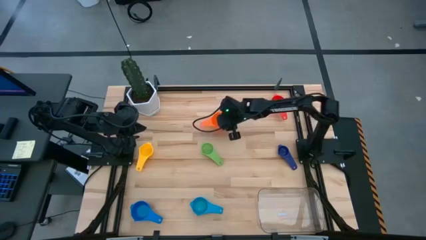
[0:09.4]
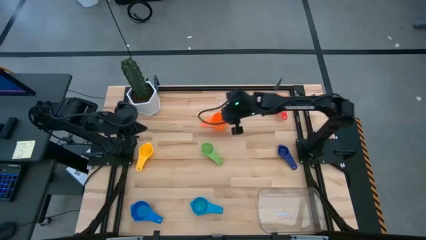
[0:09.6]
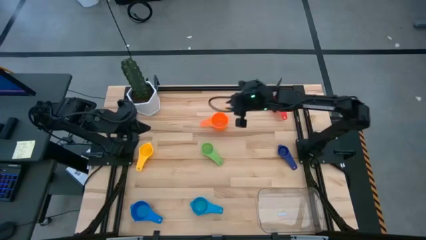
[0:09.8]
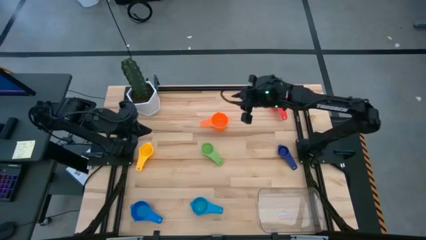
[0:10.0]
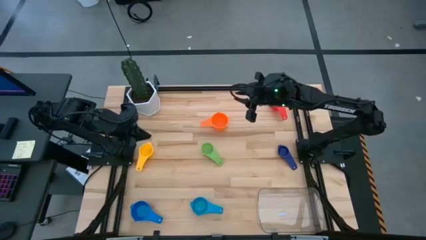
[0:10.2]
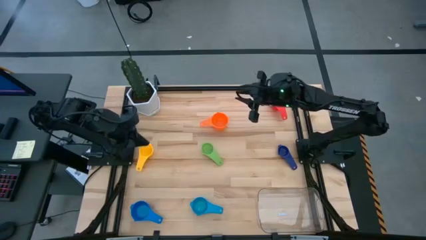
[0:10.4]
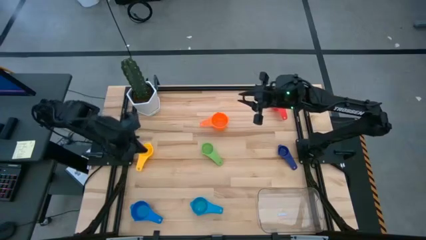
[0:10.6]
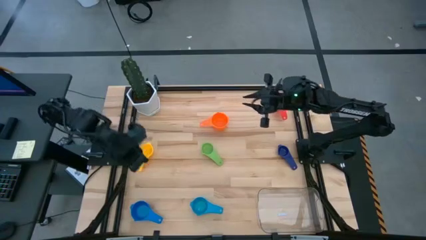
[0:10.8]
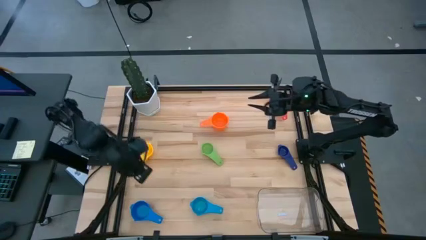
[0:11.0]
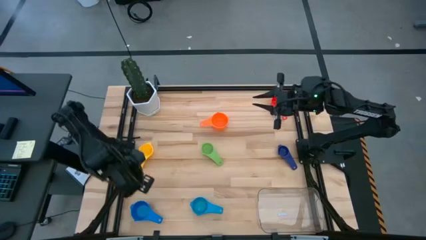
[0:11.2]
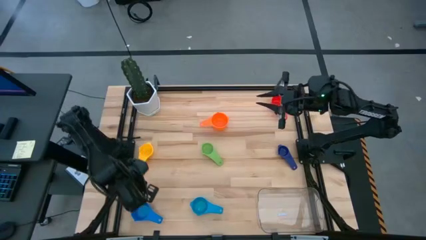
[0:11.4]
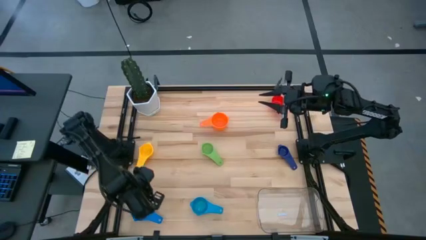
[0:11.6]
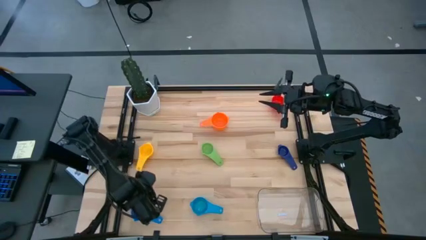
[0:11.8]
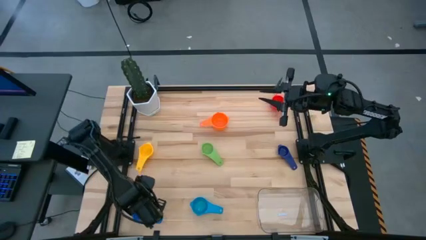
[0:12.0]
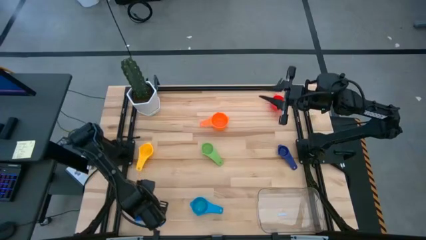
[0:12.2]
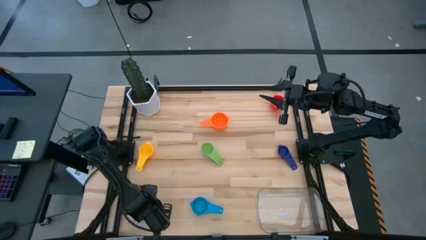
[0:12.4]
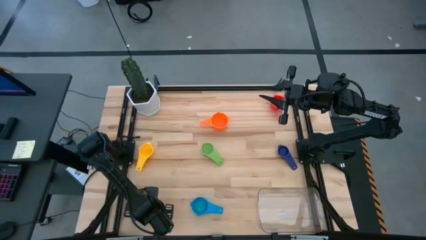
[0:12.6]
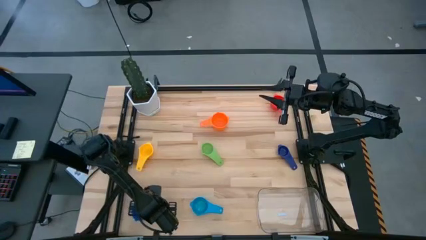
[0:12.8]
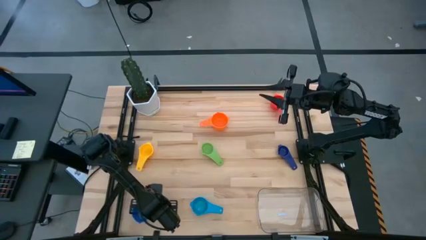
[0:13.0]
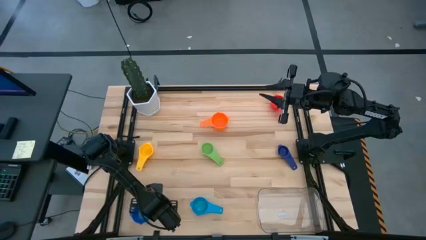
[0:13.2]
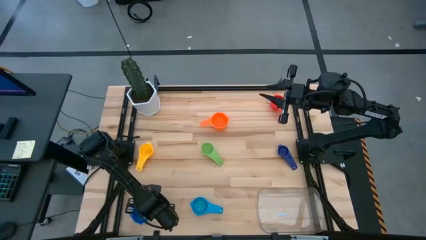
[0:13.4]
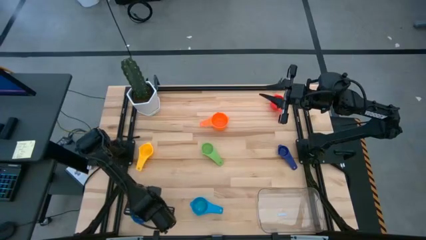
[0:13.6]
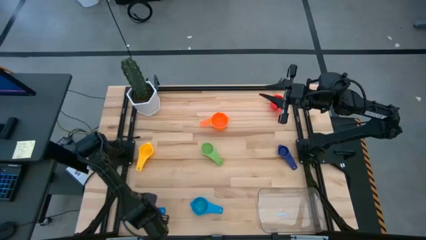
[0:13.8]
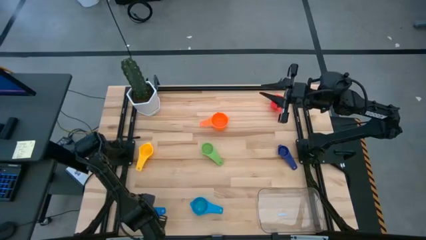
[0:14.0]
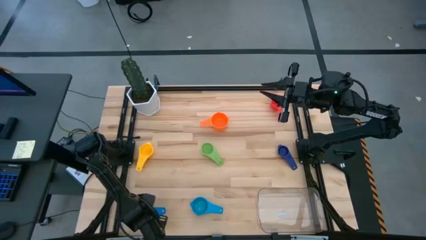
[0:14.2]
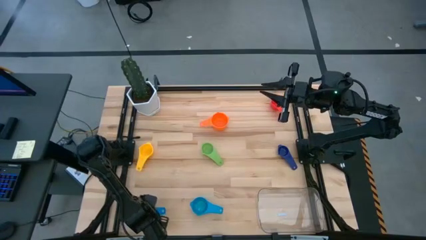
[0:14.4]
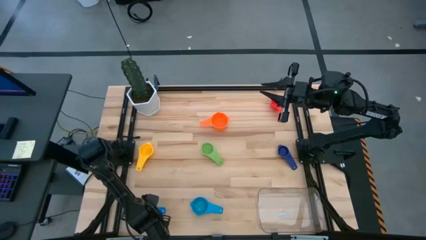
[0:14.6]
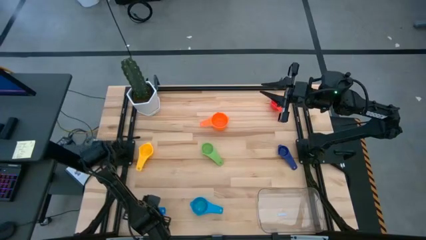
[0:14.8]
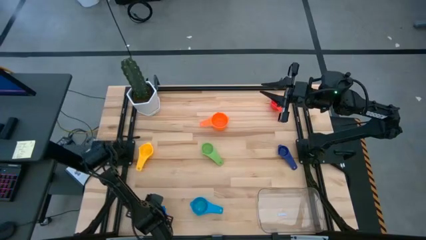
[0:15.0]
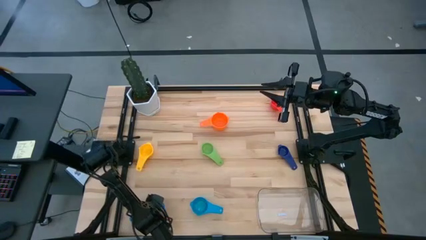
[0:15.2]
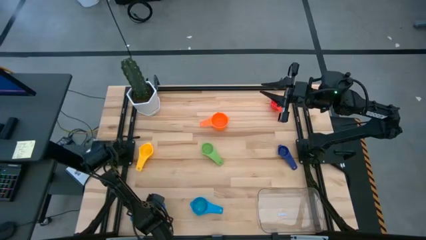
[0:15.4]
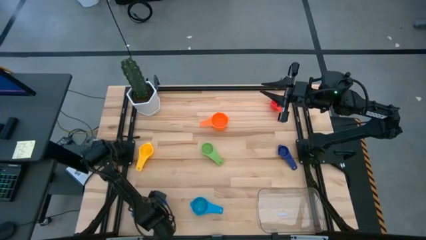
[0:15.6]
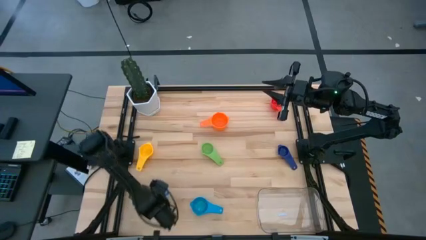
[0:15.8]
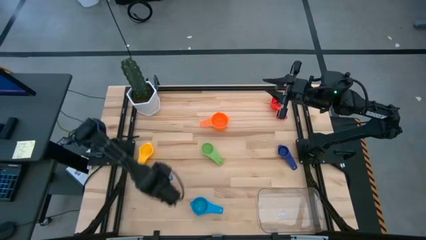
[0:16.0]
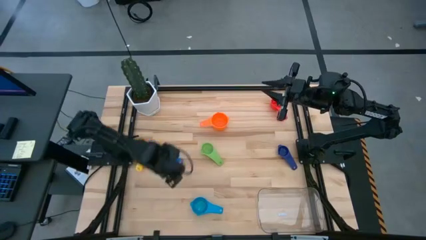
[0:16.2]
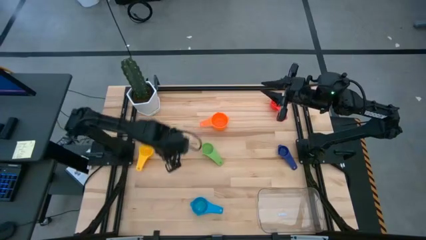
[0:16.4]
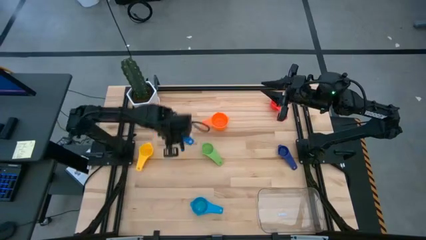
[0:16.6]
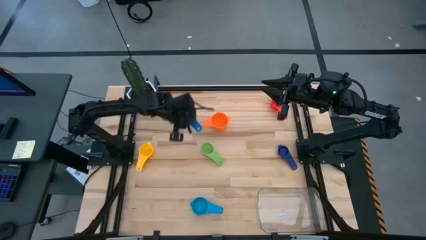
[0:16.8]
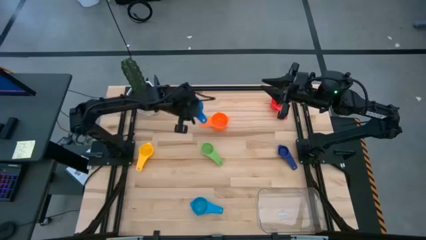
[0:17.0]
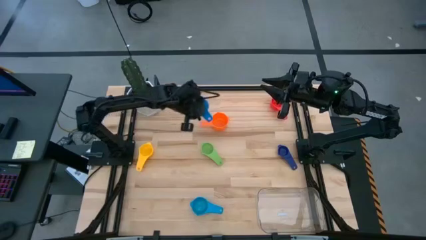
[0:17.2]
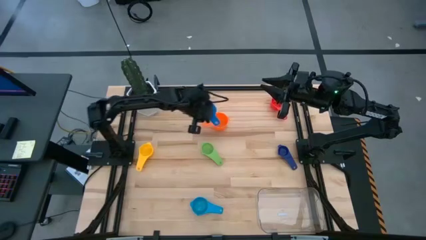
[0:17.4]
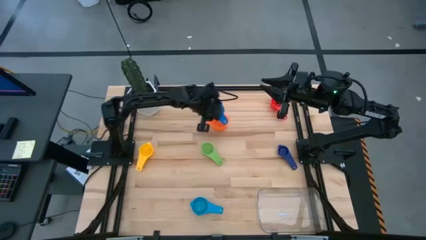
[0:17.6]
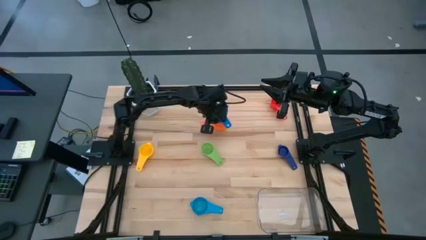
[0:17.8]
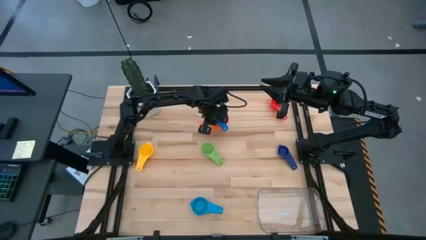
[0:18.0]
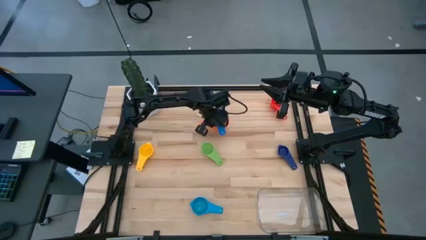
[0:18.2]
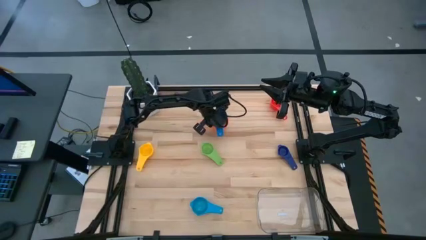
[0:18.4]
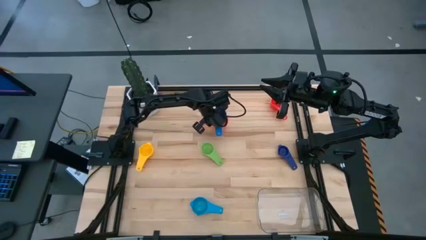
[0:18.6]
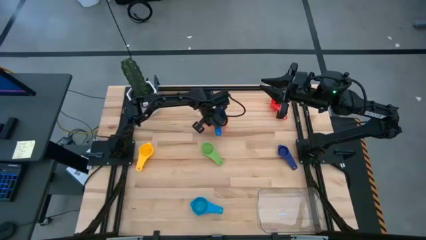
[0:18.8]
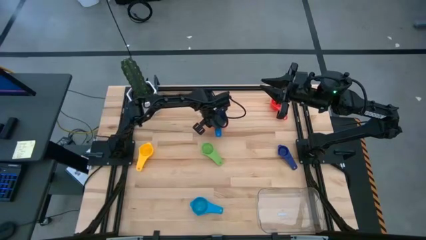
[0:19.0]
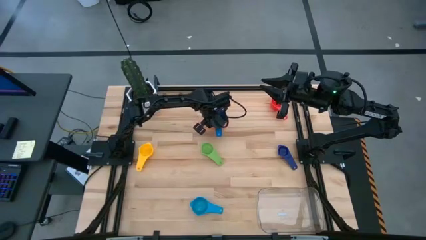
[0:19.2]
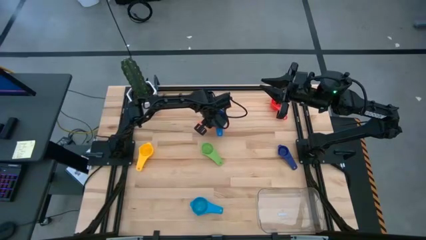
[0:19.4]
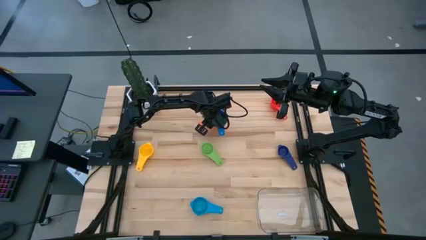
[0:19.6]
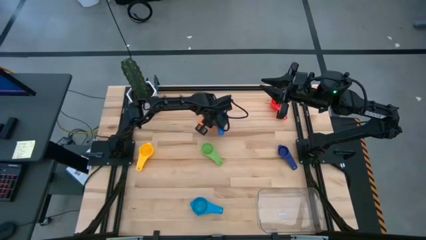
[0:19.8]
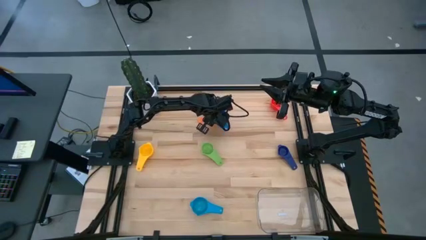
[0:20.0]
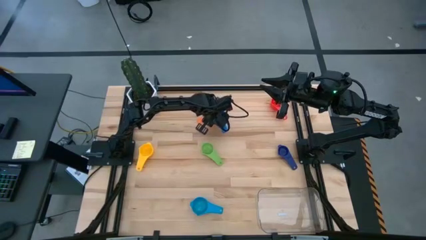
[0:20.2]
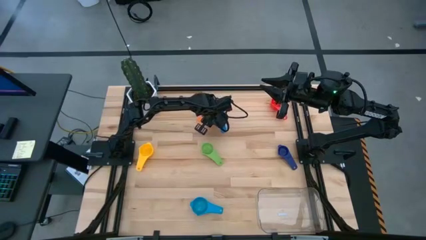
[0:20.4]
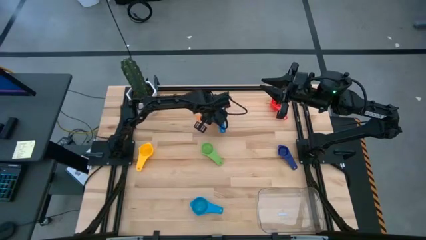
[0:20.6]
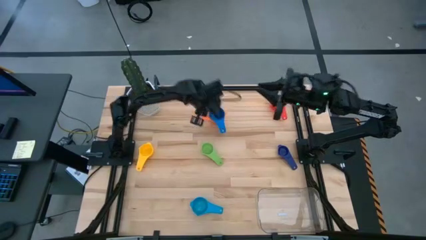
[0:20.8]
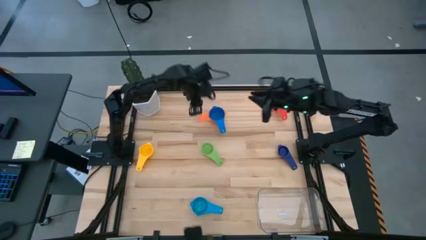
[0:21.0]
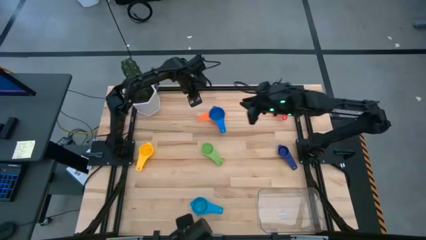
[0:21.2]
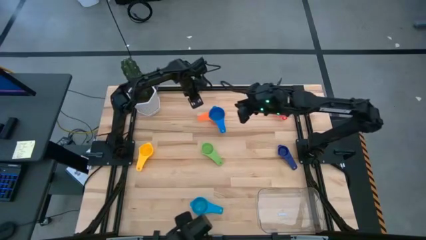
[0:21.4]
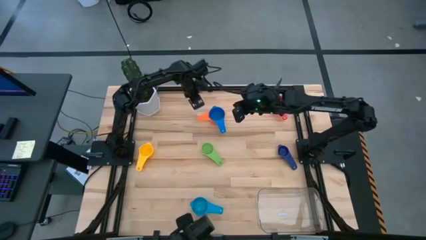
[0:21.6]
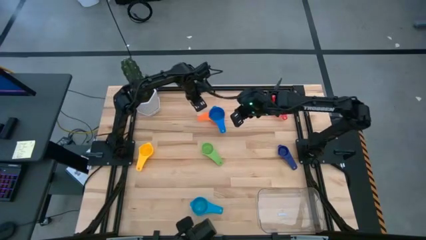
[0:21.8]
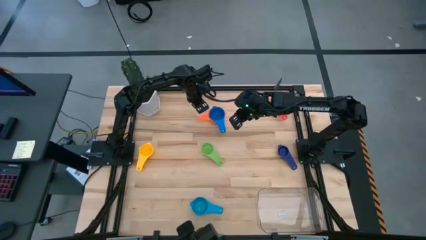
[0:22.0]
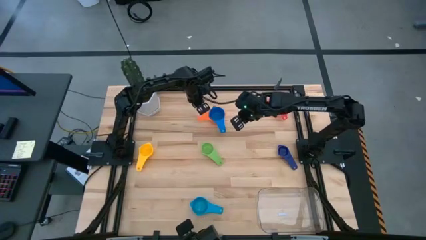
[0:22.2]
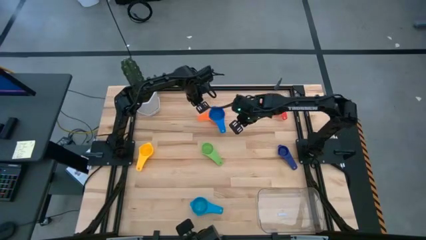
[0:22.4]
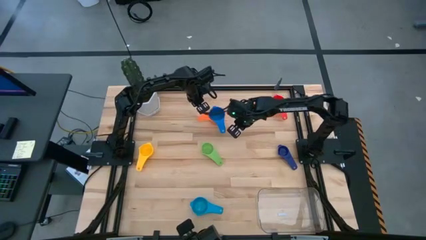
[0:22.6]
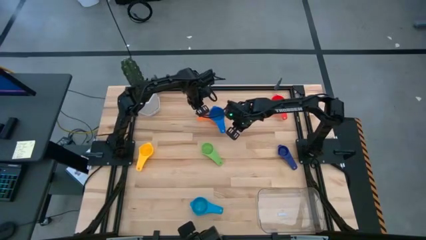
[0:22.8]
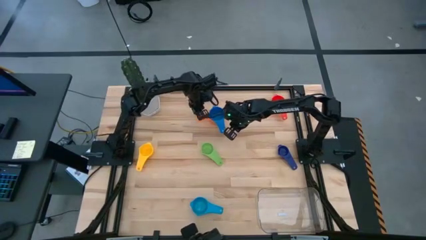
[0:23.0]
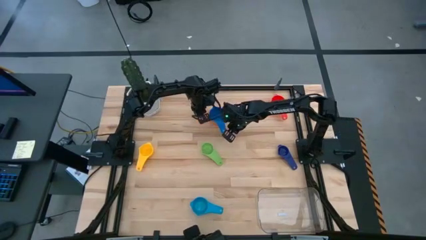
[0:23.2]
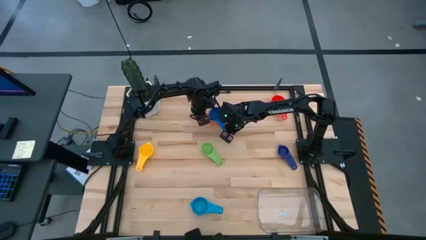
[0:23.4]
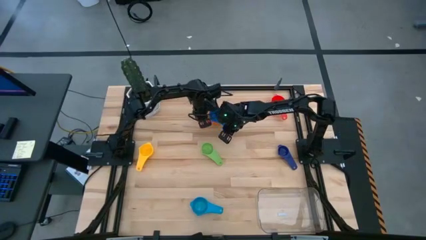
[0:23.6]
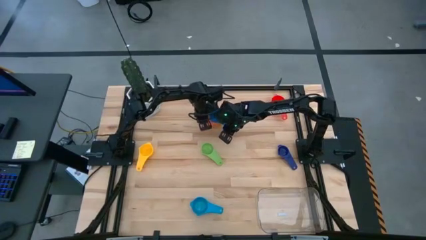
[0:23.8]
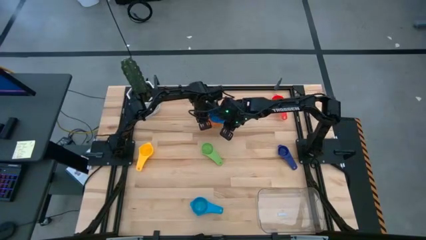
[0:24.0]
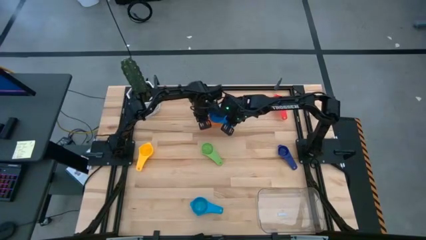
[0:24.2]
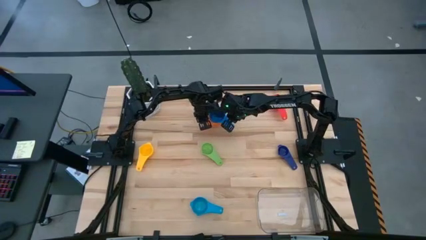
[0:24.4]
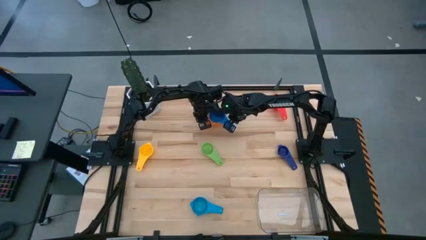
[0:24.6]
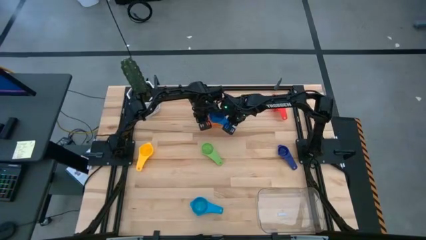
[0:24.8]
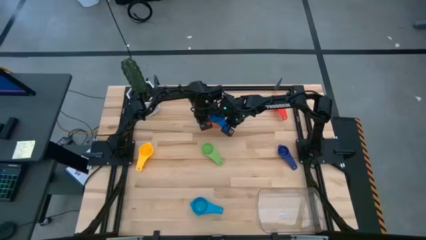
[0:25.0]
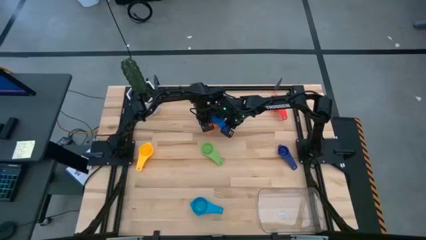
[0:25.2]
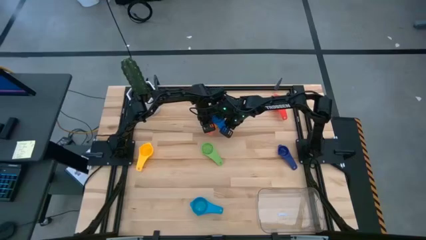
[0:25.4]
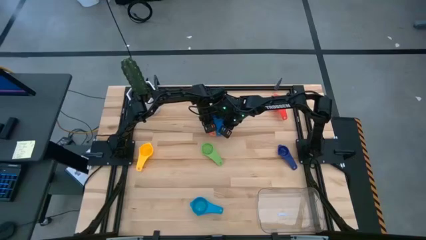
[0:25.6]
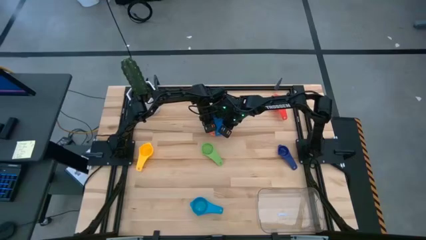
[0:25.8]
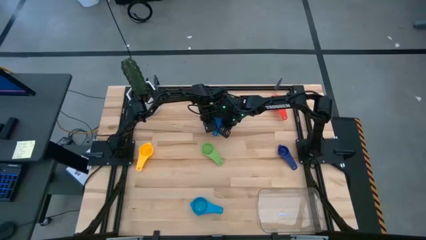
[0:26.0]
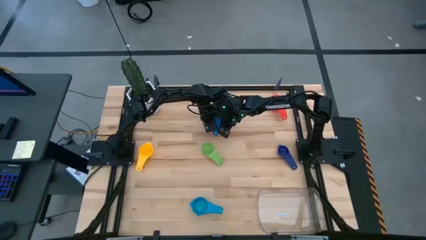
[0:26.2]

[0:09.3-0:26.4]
Task: Nest measuring cups in basket
Stack the dark blue measuring cup on top of the orange measuring cup
